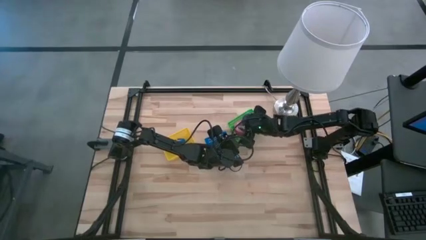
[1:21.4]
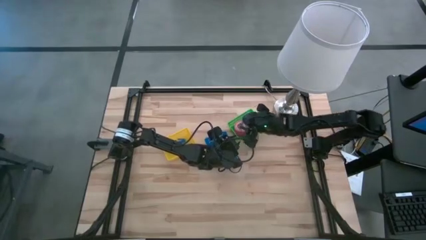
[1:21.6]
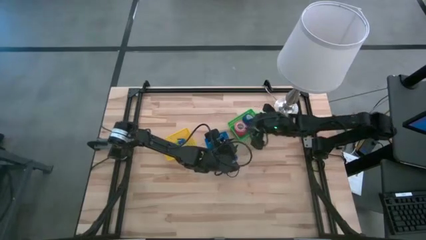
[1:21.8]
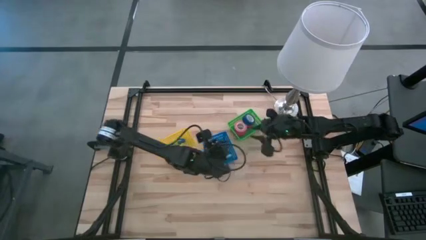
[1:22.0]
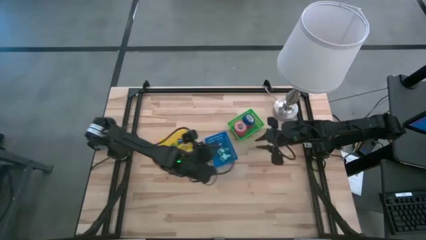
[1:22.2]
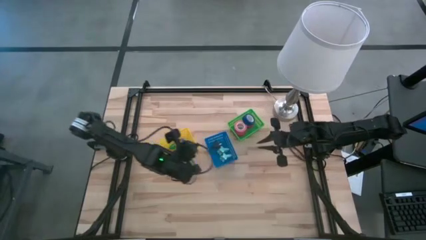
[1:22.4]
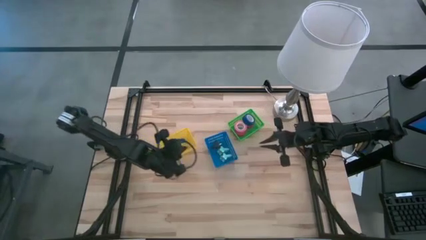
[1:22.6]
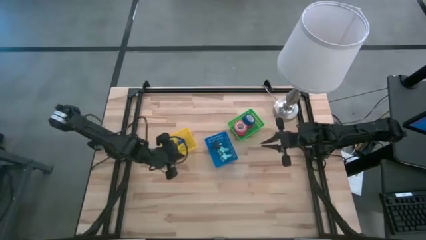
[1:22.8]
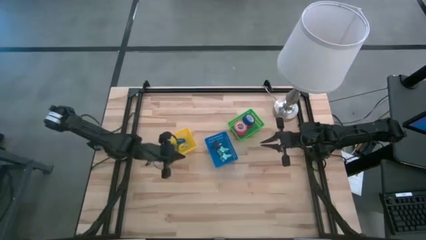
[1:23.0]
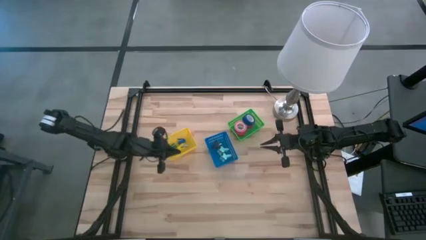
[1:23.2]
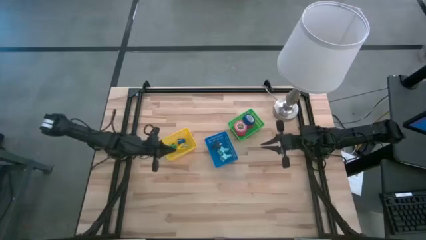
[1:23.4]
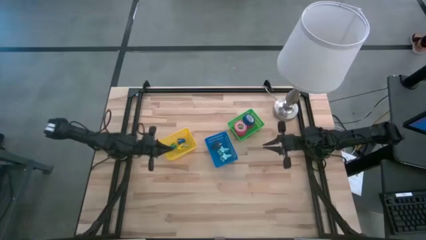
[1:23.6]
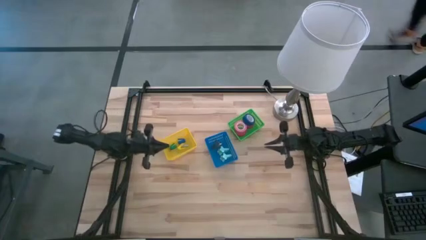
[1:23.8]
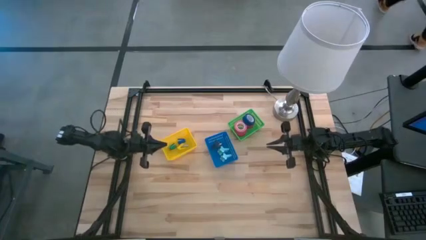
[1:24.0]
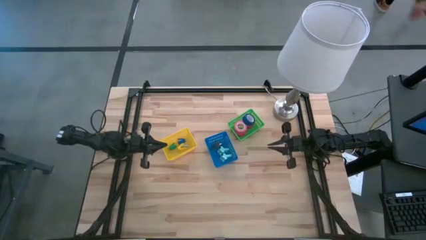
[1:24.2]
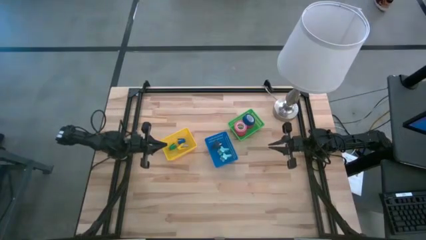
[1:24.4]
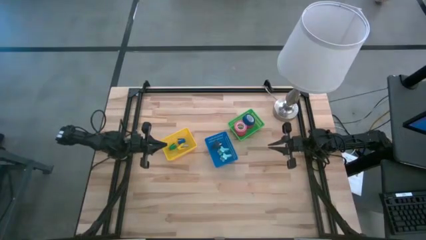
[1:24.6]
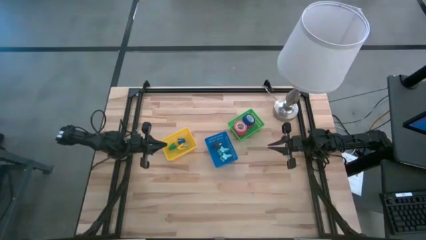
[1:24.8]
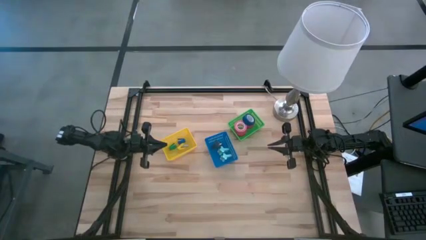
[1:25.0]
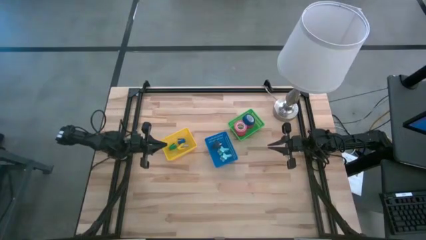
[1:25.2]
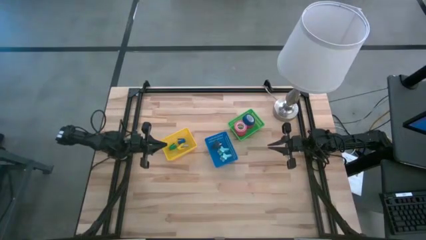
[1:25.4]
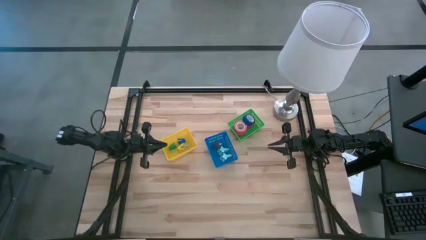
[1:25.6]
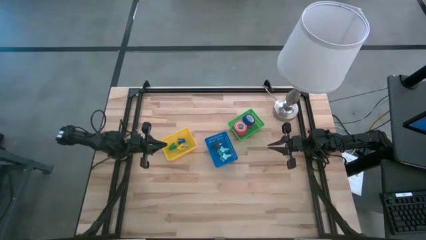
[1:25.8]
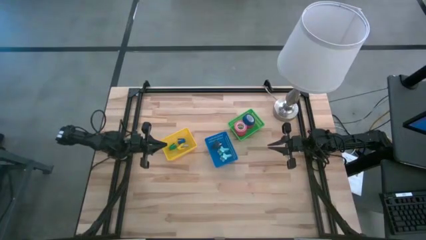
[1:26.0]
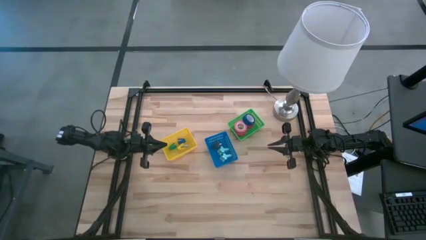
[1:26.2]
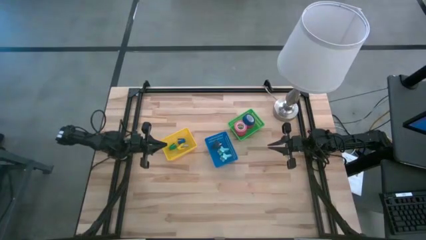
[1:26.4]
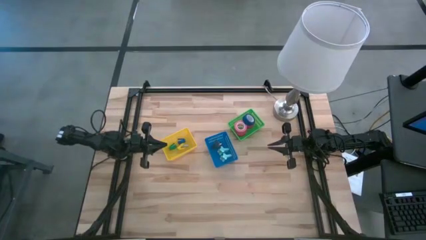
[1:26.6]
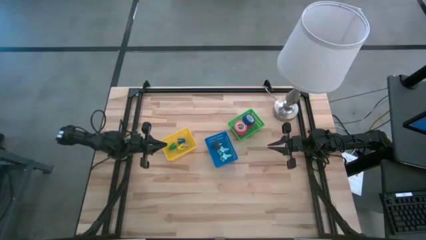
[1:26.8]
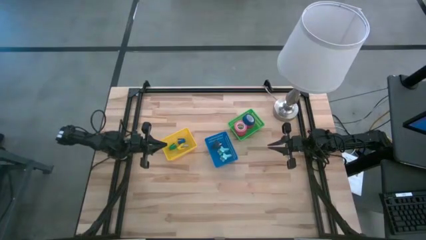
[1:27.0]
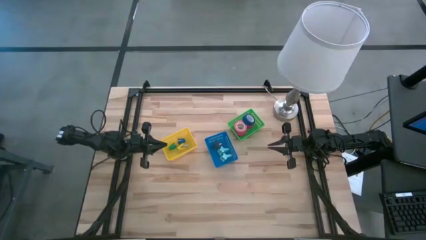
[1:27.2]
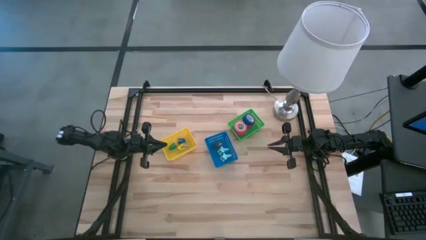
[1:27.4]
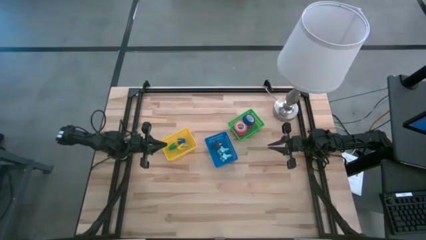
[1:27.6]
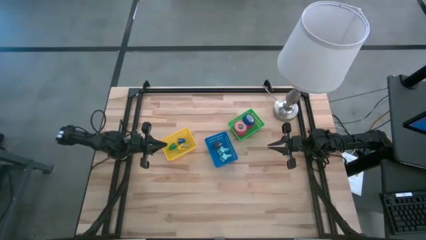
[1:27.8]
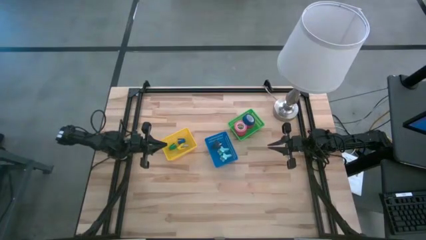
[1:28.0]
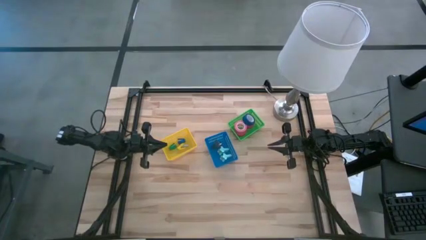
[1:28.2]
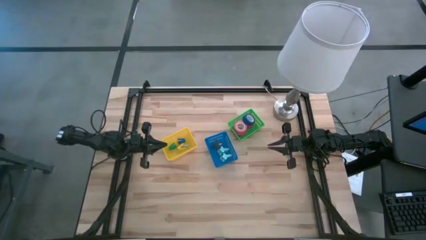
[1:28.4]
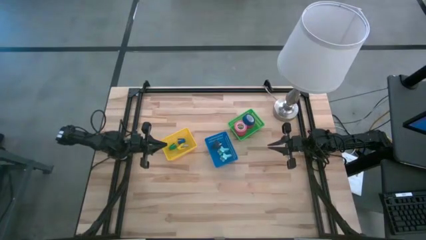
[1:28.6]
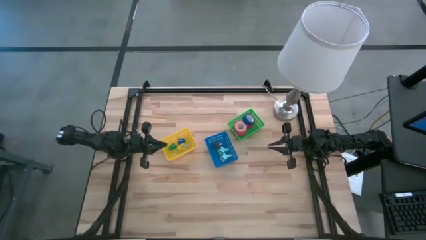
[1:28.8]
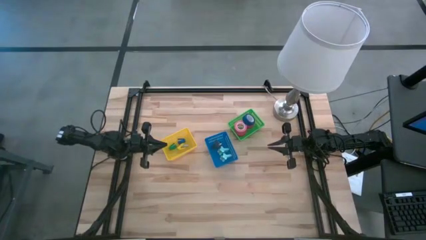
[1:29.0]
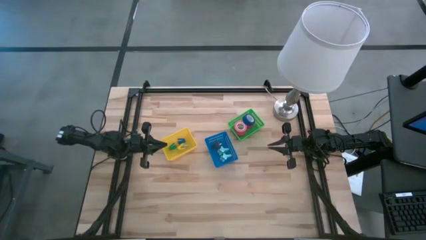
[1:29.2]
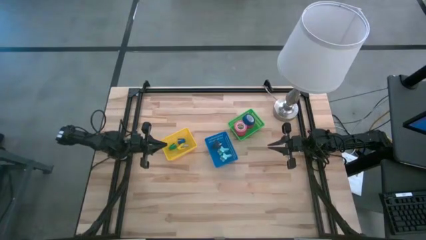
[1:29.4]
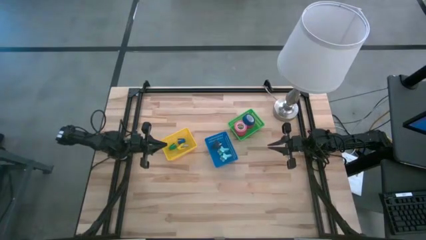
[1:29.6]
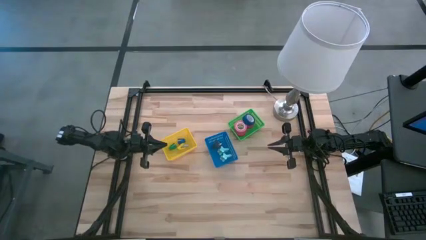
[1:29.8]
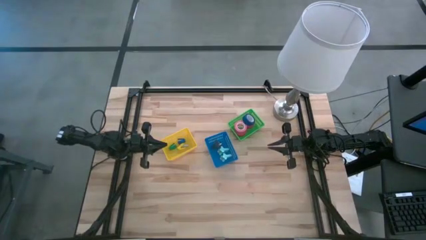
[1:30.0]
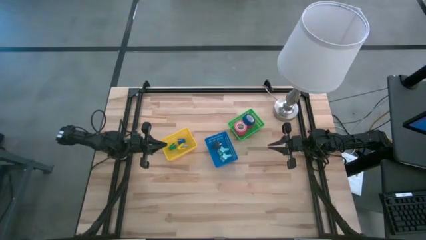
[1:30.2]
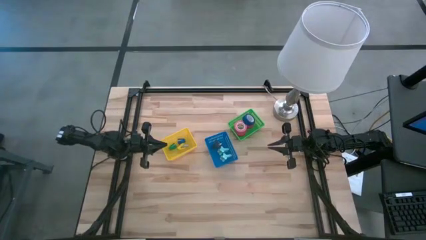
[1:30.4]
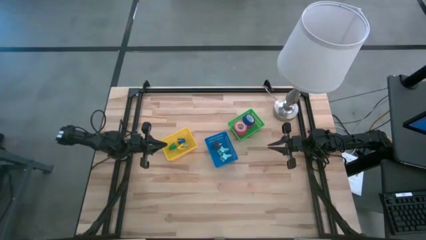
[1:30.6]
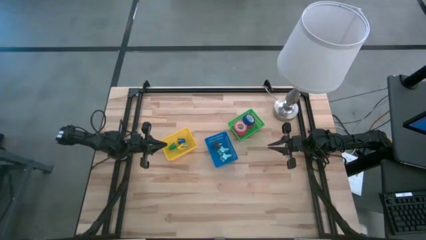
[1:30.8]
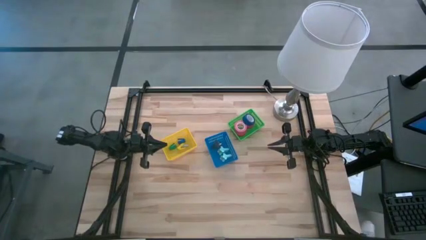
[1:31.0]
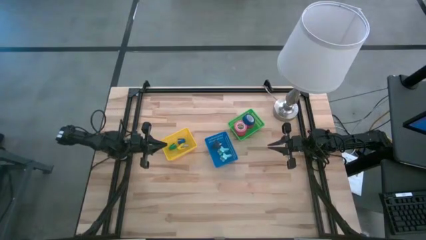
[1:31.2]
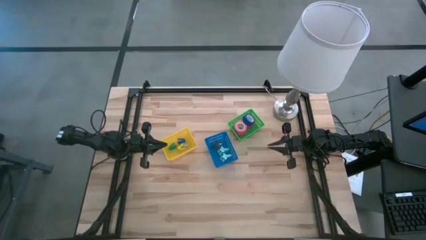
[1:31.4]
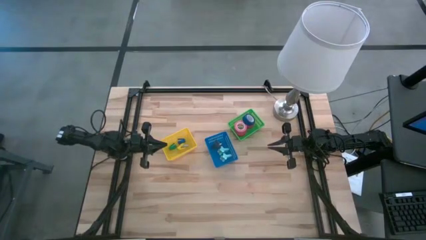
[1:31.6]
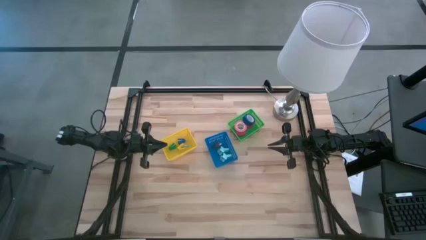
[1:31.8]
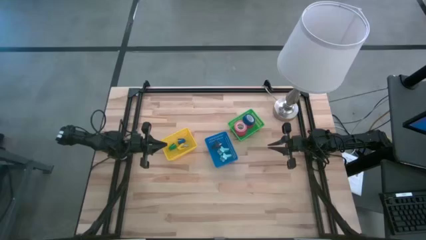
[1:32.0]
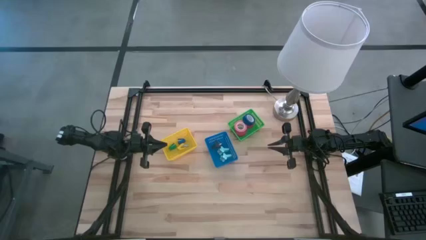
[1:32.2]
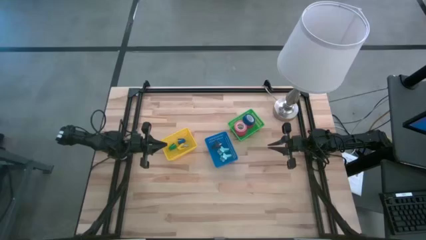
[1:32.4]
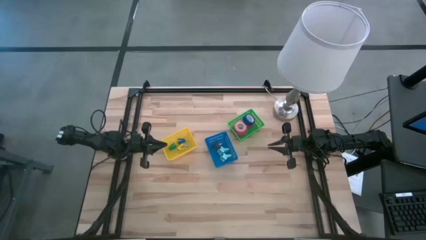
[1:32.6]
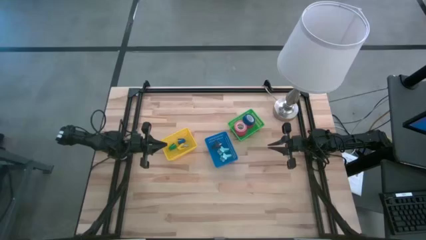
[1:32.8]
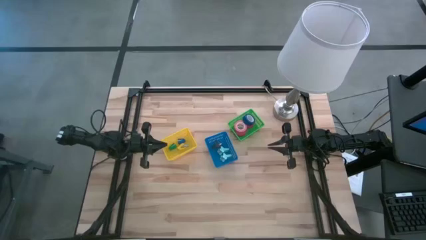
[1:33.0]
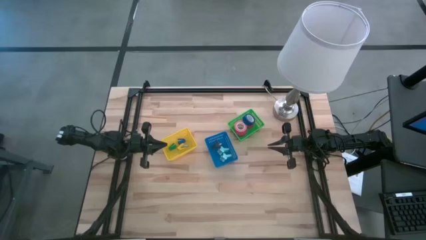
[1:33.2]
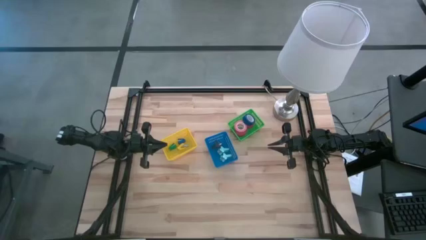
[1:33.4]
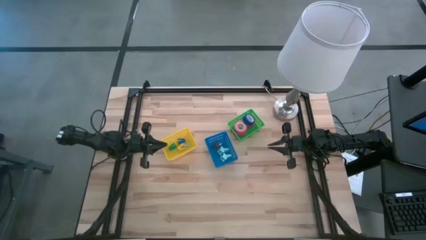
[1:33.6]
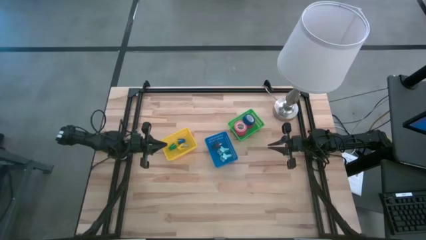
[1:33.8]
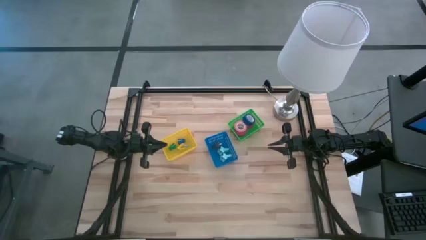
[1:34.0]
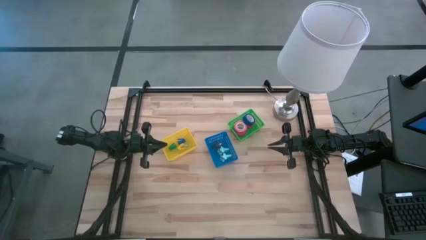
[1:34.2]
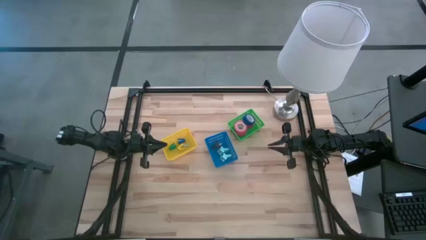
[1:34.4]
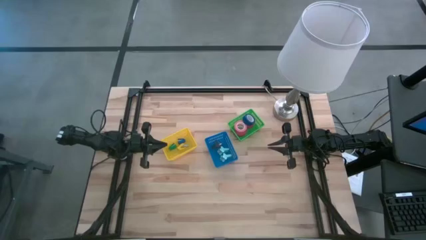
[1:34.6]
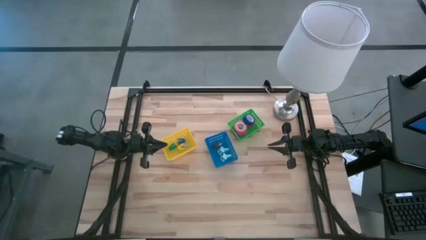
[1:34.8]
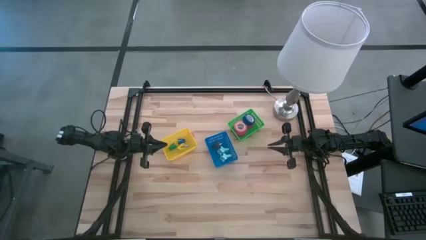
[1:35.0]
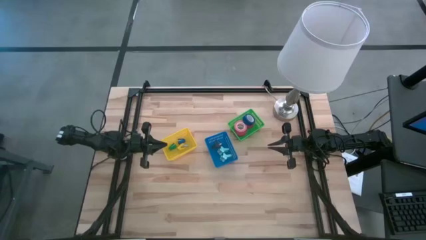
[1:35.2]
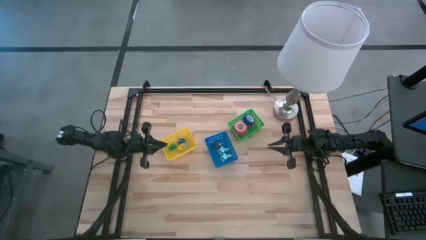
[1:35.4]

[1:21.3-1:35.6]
Task: Pick and place Stapler, Stapler remover, tape
Return to Home Position

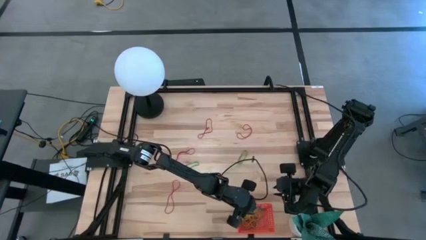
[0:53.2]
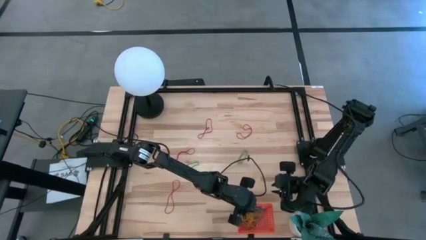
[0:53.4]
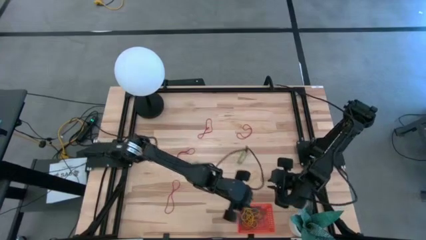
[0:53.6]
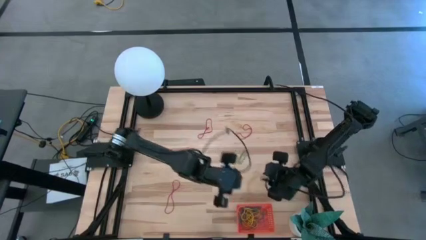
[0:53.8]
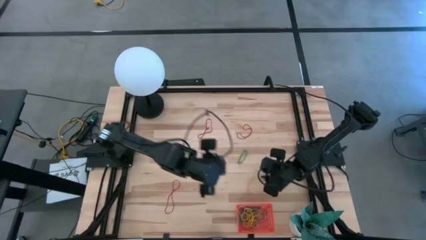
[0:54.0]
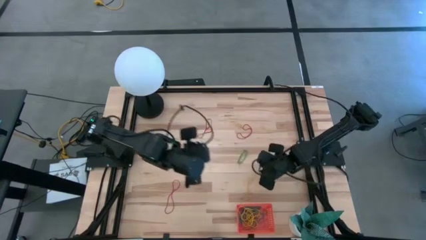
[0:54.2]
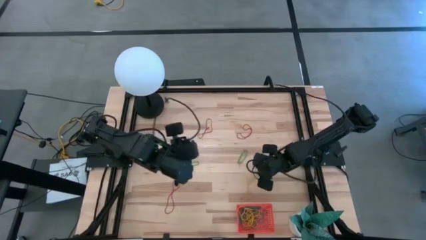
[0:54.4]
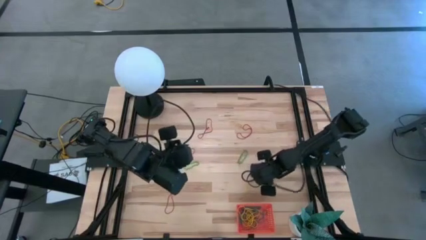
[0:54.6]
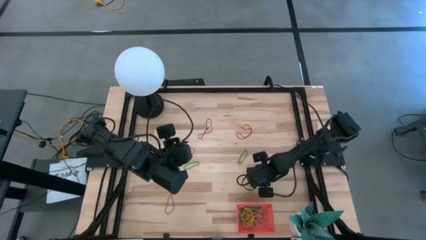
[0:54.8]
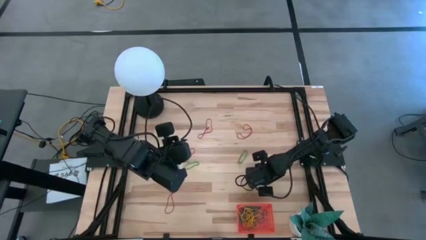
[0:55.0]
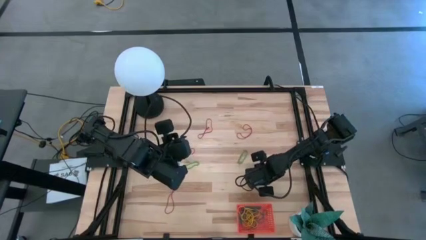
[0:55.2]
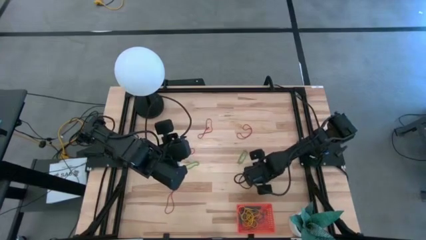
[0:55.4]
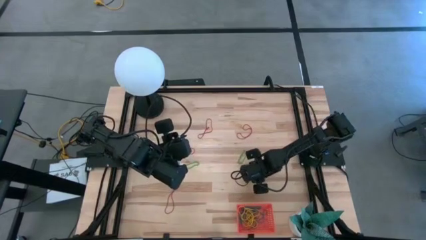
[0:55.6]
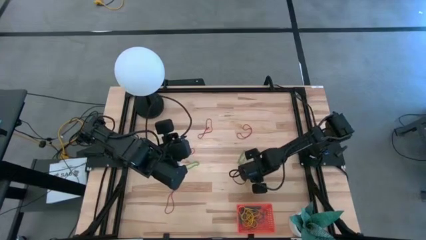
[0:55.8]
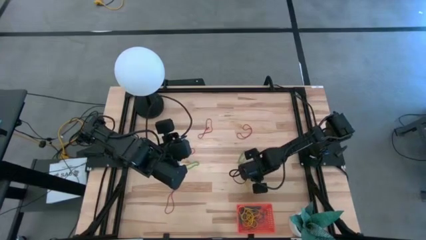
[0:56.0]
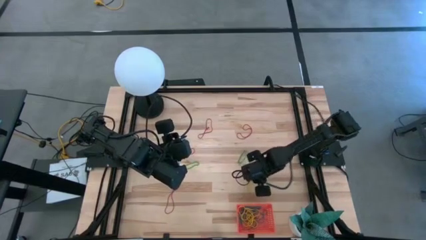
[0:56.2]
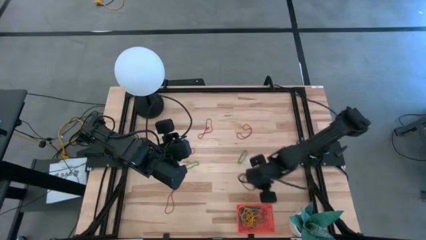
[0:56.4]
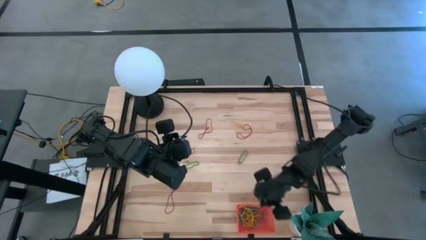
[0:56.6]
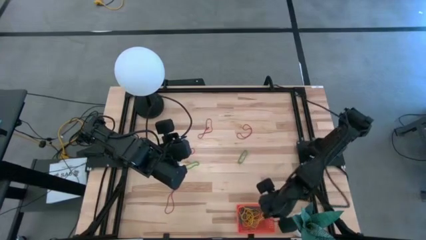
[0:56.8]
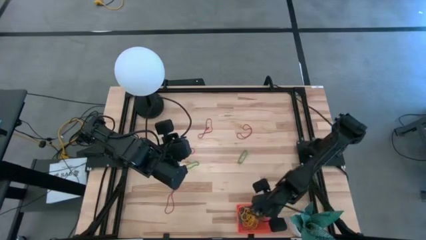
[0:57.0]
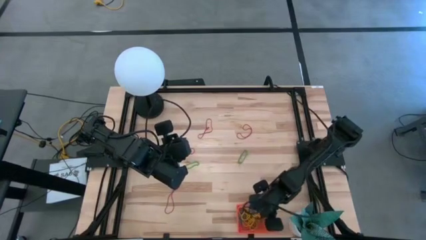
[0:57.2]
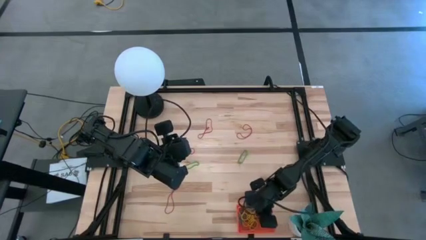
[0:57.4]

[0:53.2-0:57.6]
Task: Pick and place items into bin
Put the yellow rubber band into the orange bin
